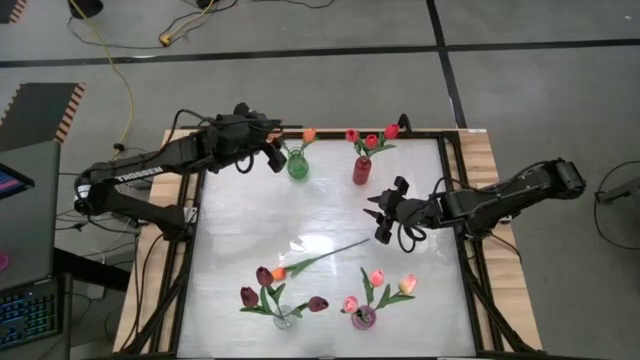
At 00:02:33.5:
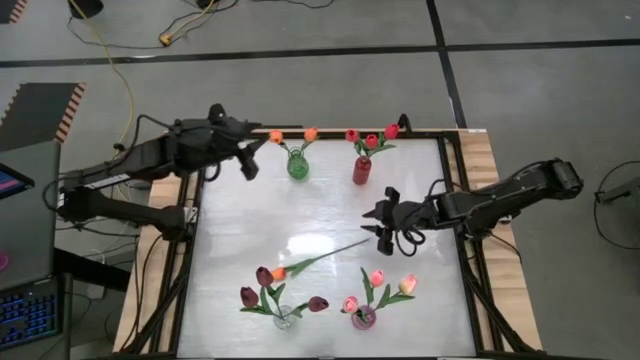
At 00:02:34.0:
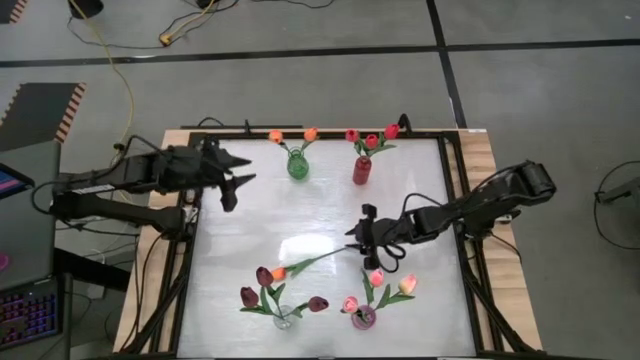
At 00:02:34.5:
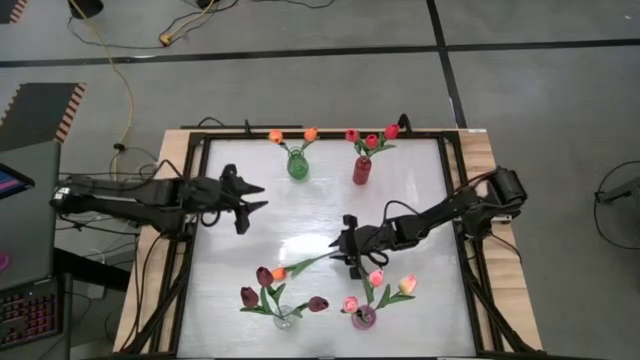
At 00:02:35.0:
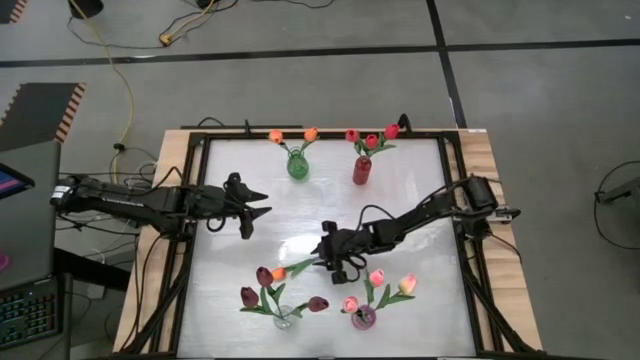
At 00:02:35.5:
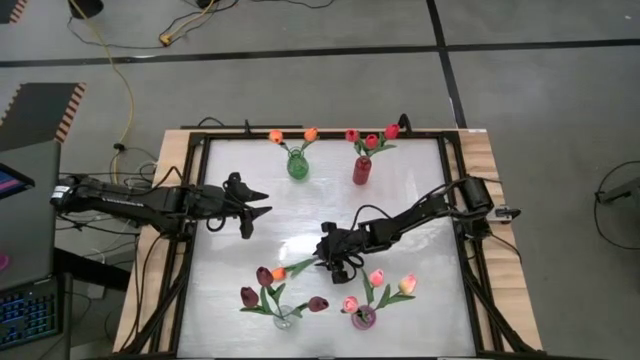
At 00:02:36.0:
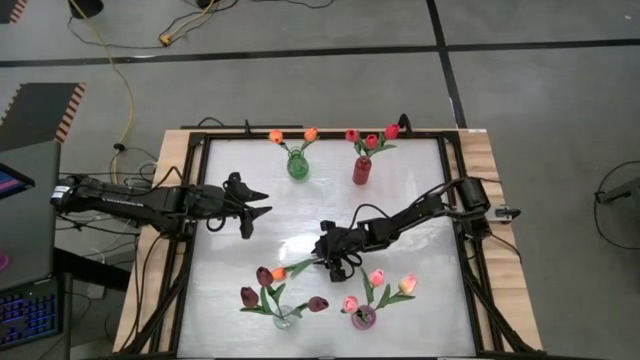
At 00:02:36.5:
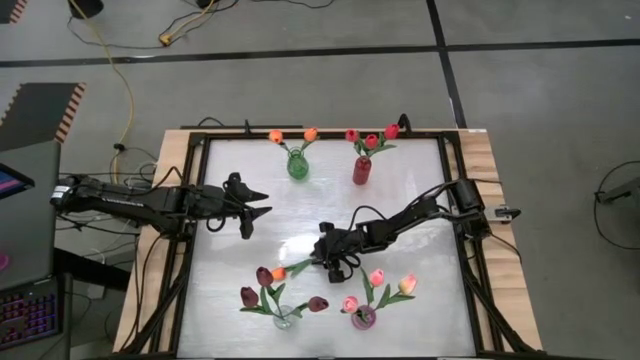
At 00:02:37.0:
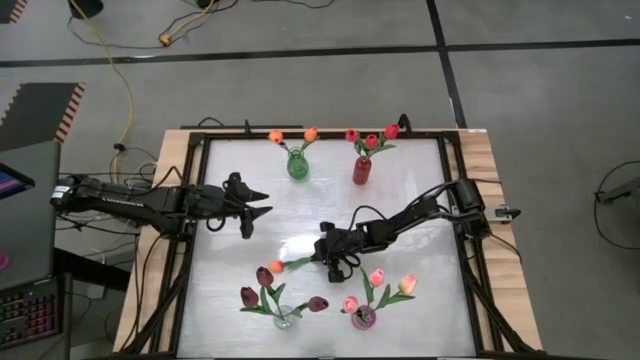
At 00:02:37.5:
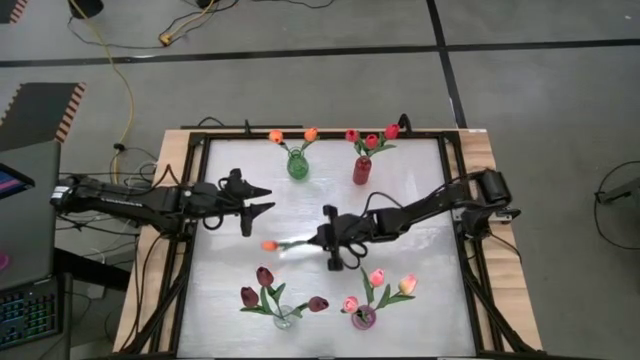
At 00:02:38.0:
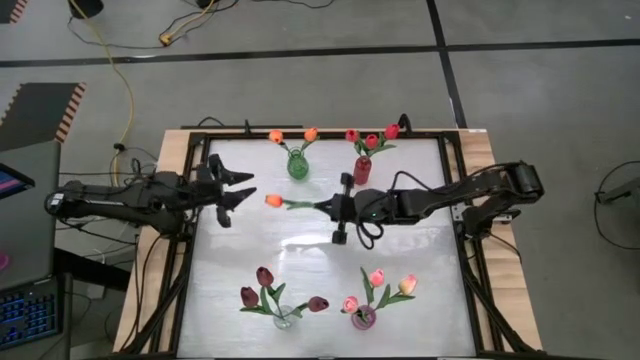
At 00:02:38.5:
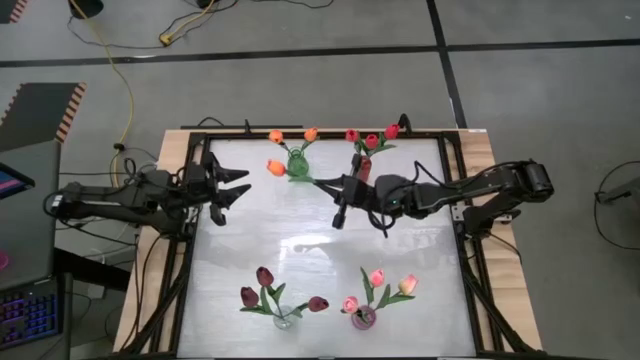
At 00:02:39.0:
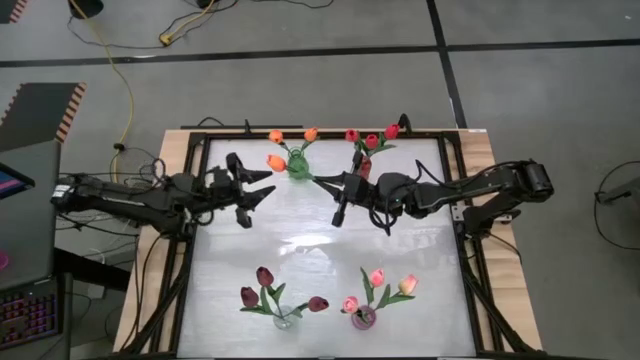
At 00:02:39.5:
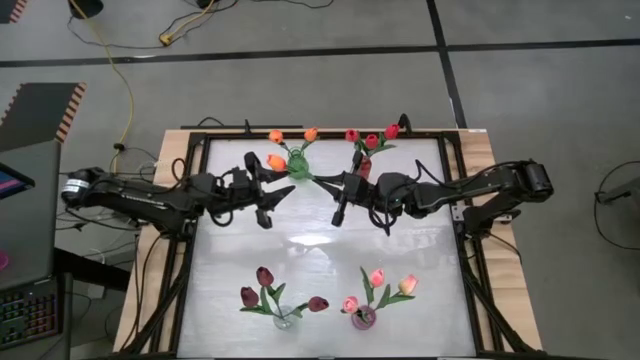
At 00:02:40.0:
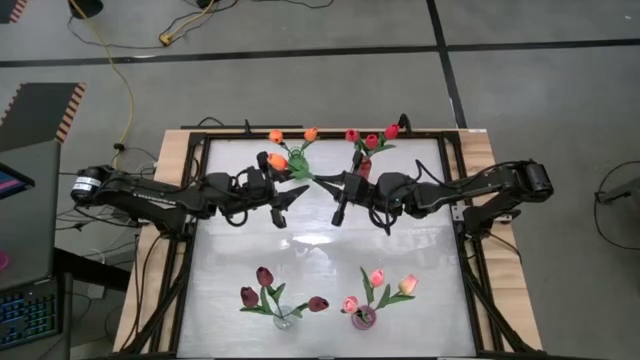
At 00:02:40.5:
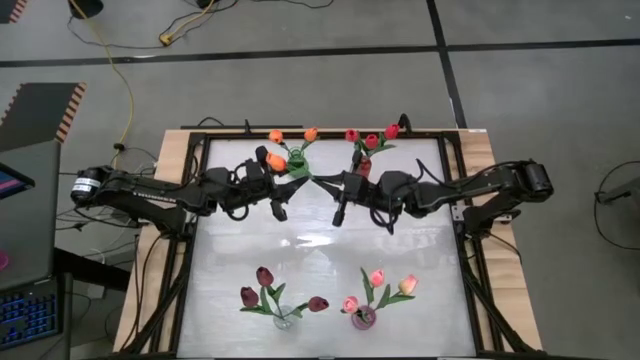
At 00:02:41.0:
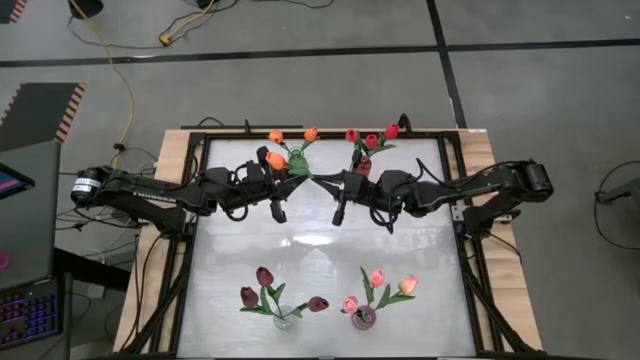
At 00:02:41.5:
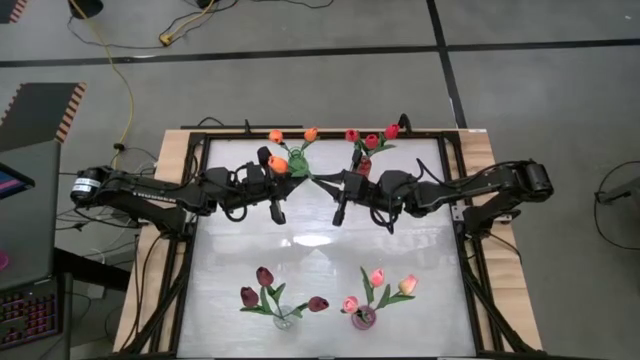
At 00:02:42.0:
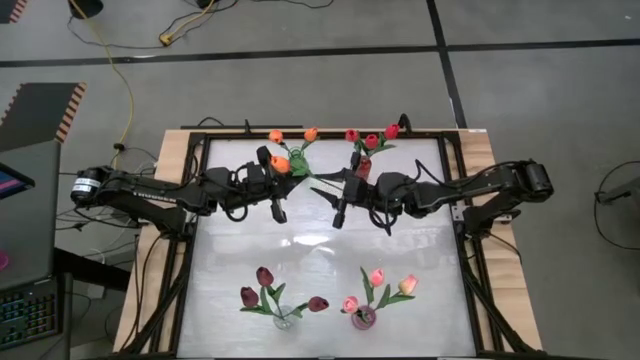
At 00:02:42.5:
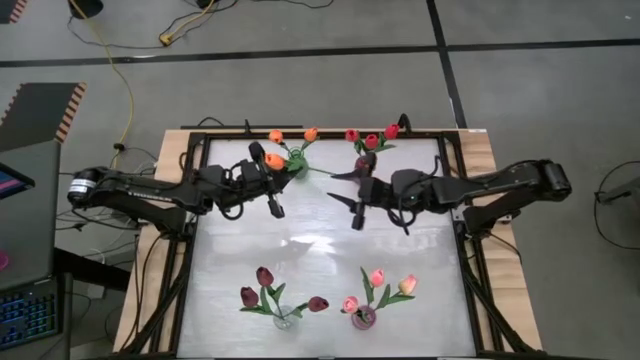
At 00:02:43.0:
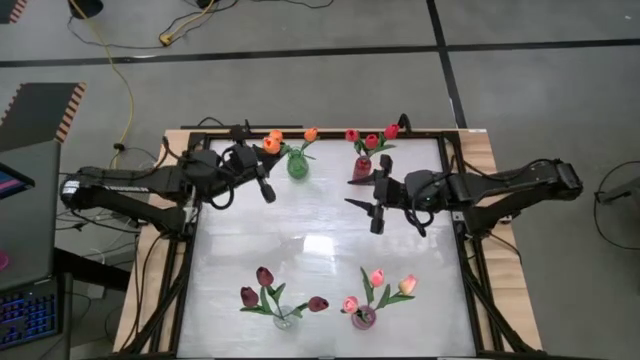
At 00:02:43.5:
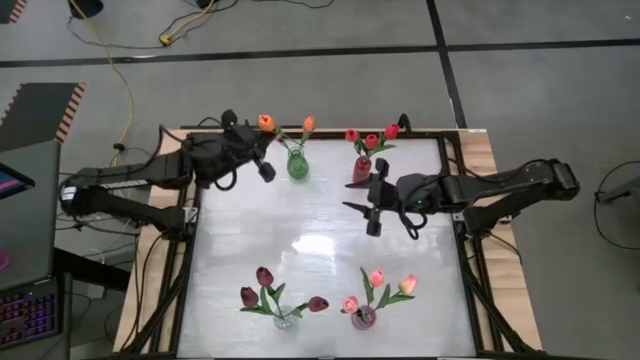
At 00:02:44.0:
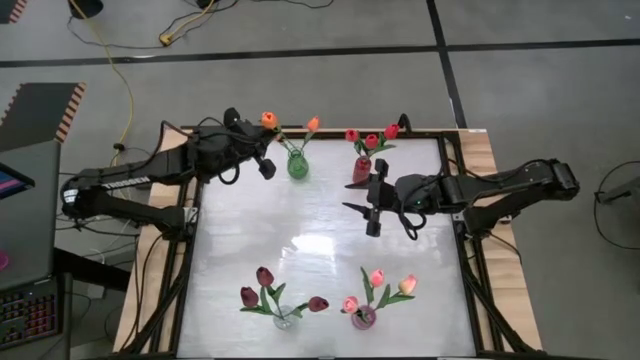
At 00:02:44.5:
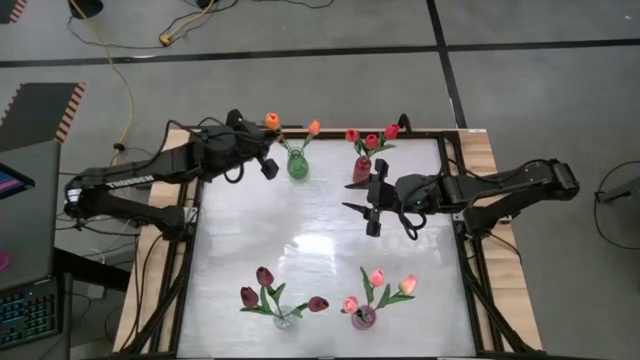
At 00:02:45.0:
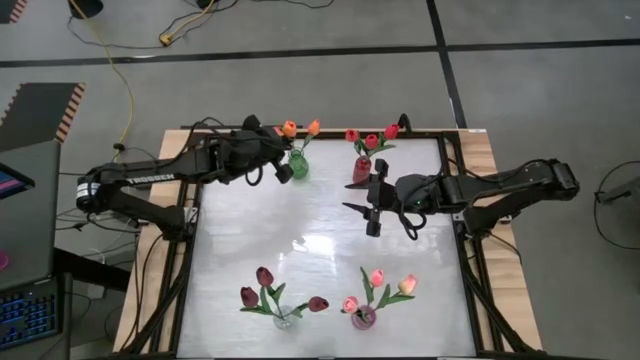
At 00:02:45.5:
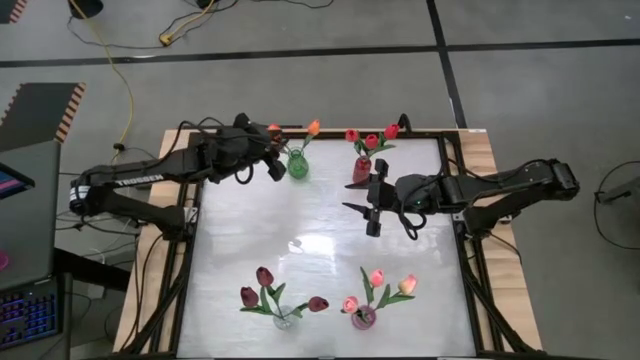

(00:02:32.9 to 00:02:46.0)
Task: Sort flowers into vase by color
Put the orange flower into the green vase

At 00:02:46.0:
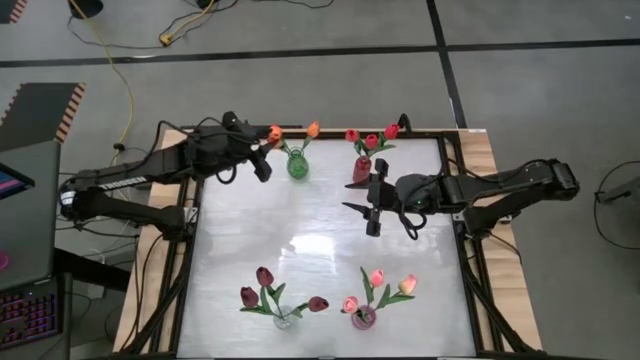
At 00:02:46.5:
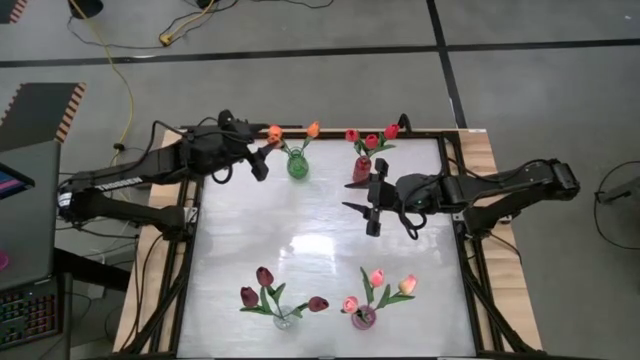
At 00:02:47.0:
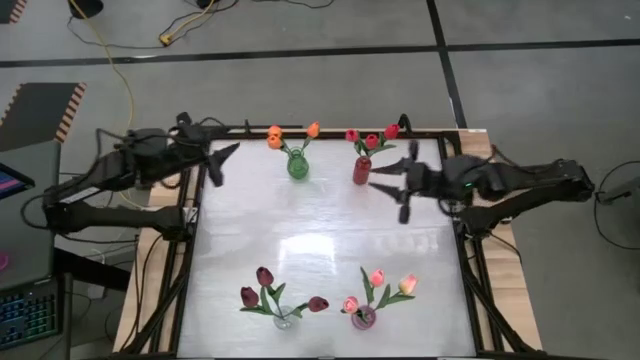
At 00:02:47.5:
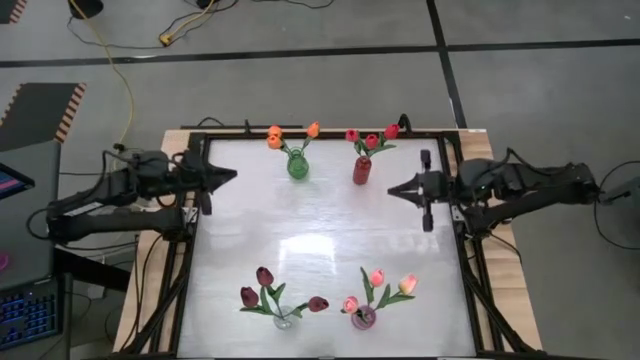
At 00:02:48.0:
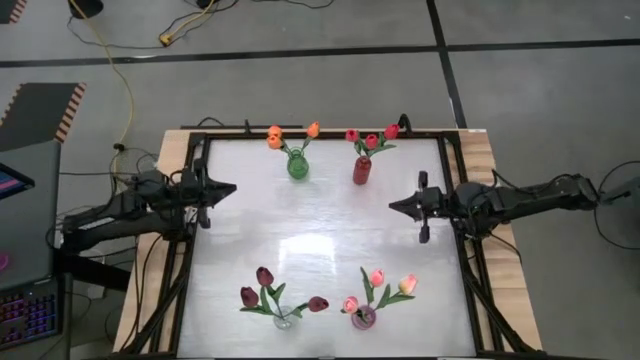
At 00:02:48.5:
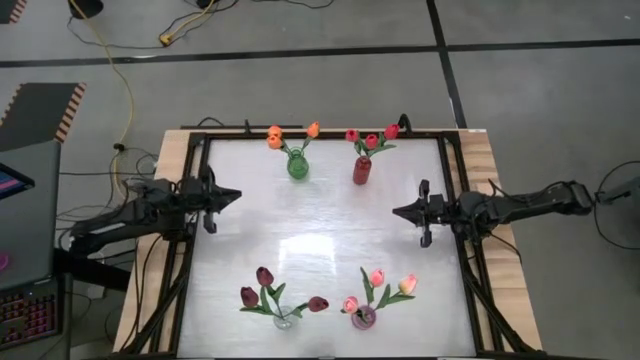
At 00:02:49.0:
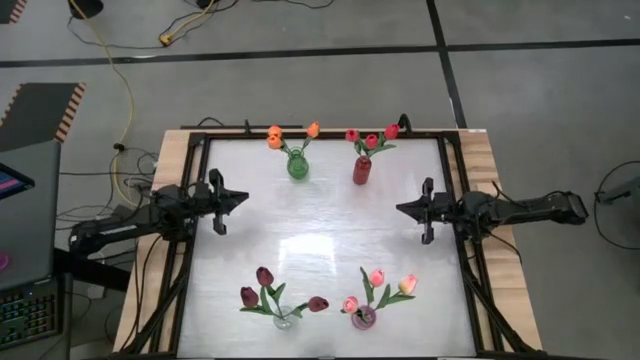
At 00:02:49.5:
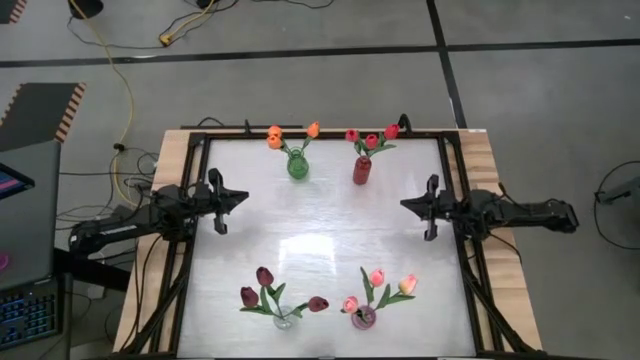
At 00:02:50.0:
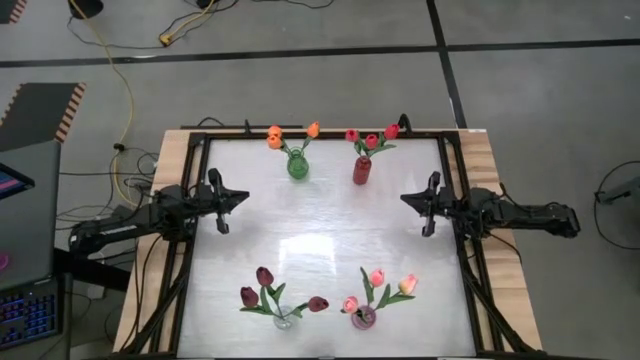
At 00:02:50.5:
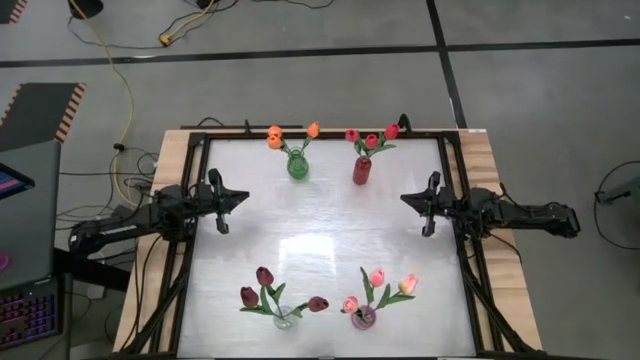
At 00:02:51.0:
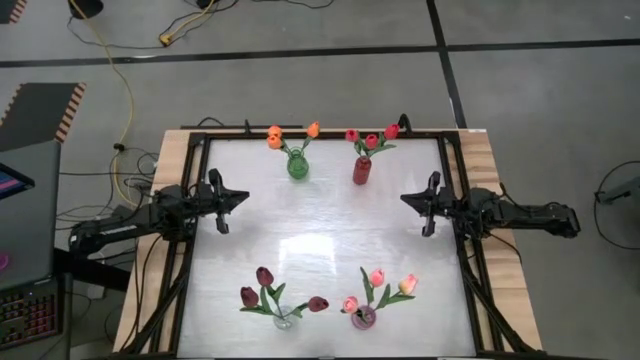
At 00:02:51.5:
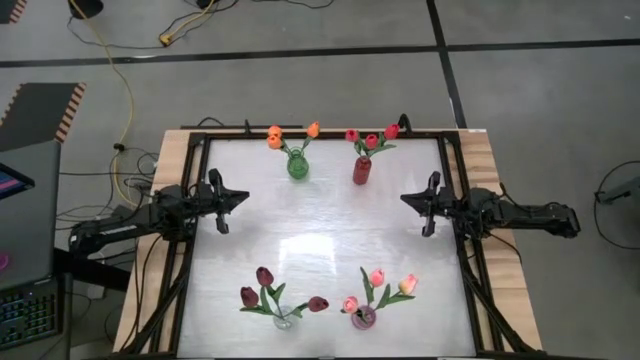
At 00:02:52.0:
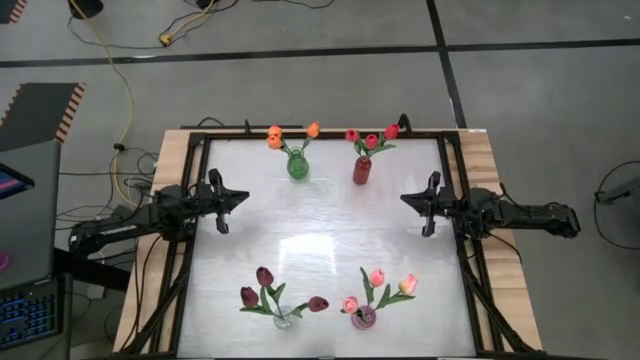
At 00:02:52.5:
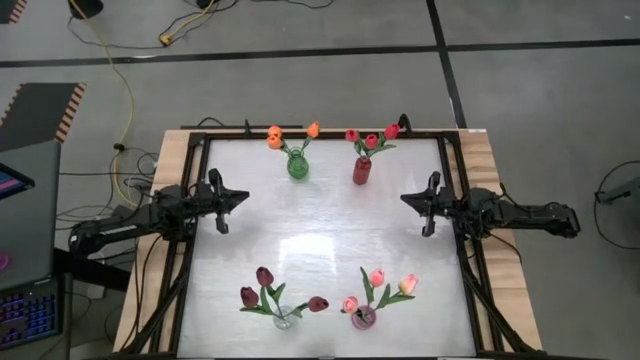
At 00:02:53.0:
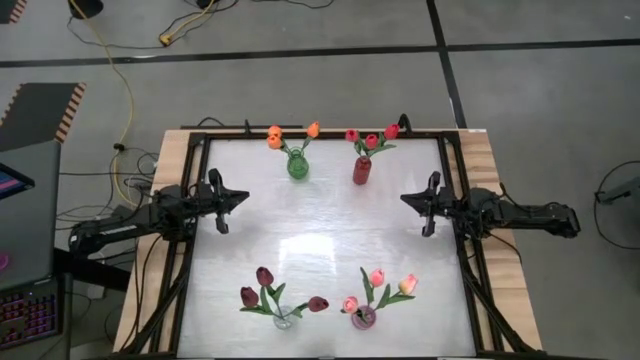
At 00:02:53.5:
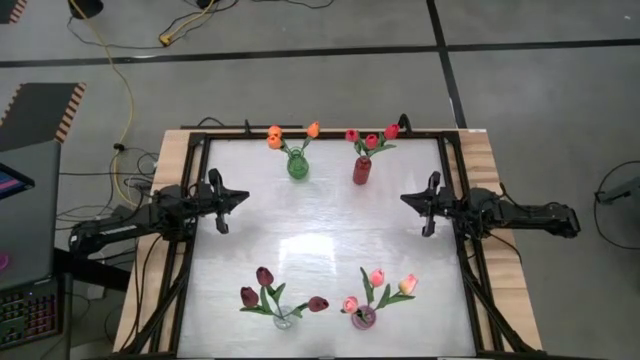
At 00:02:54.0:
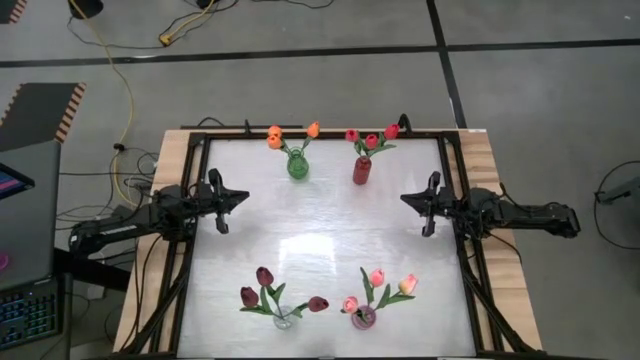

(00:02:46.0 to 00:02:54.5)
Return to Home Position
